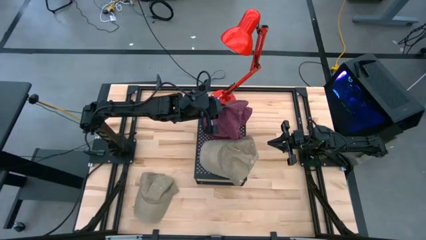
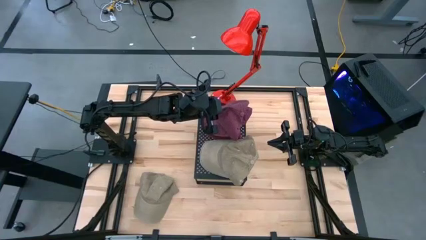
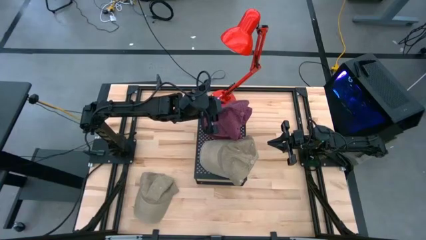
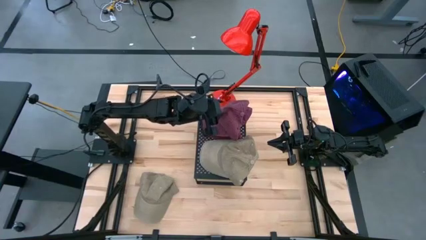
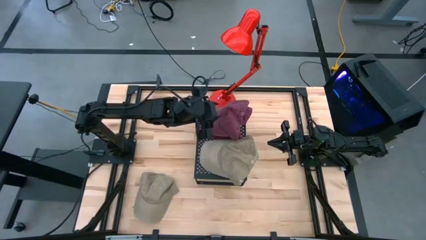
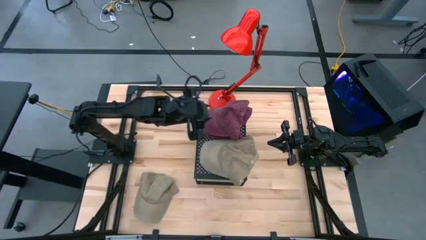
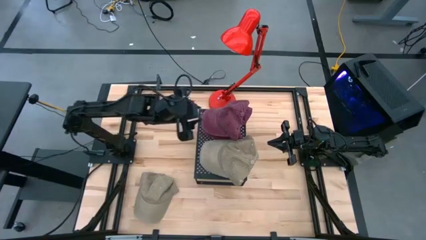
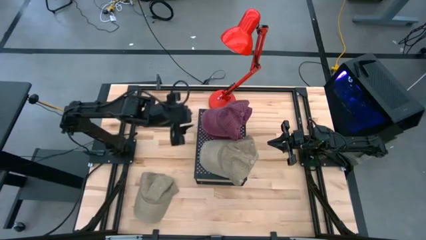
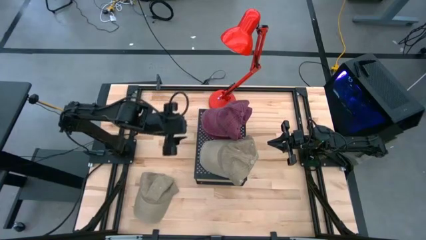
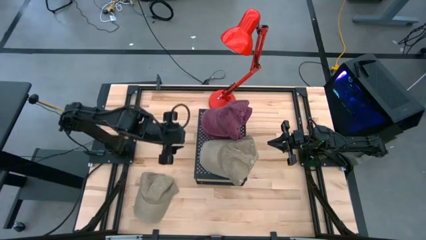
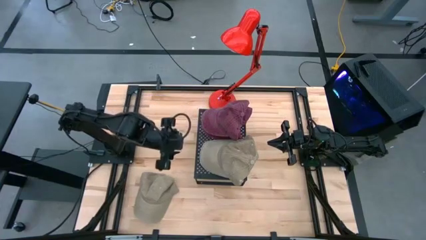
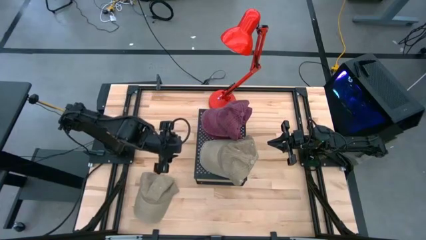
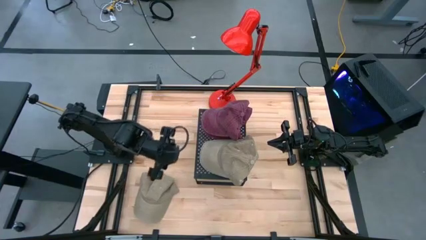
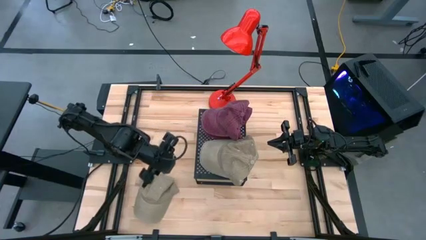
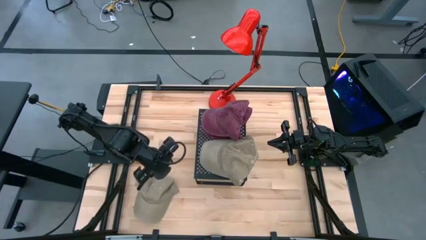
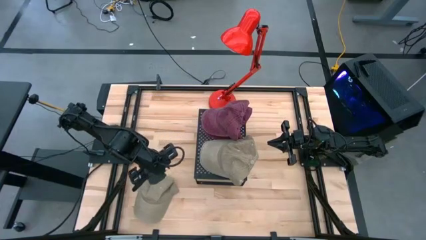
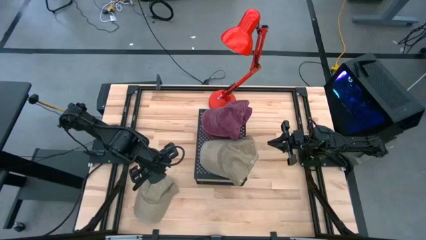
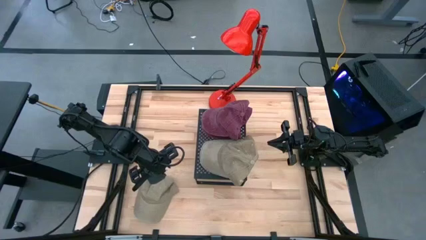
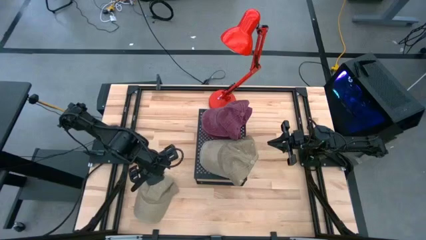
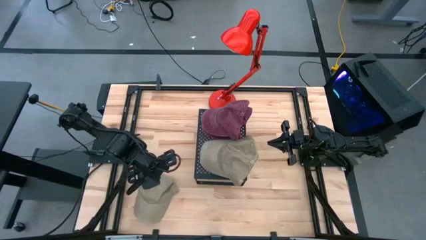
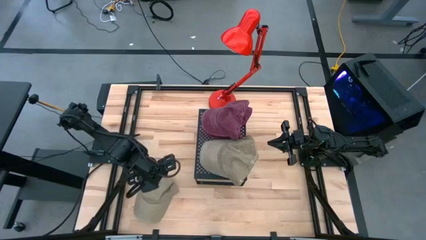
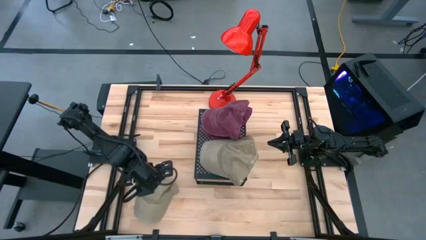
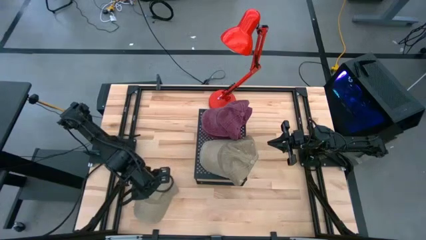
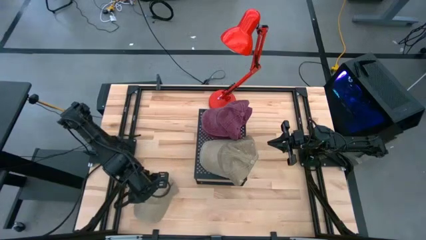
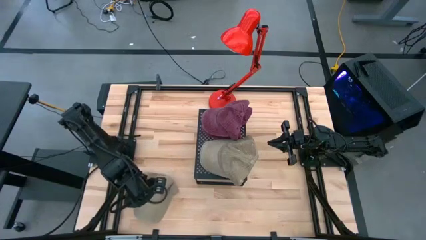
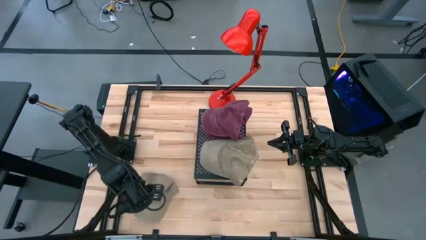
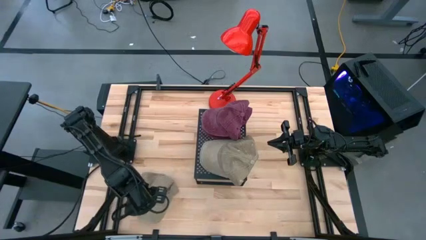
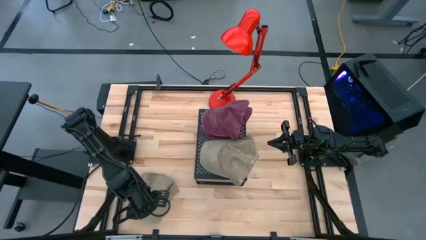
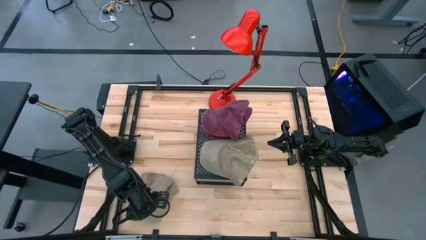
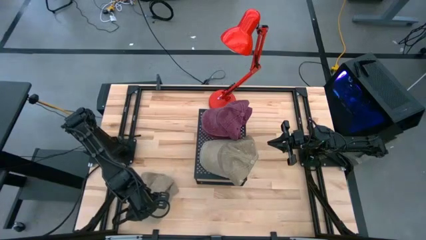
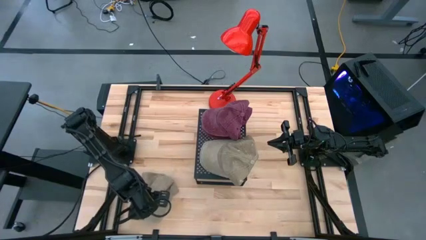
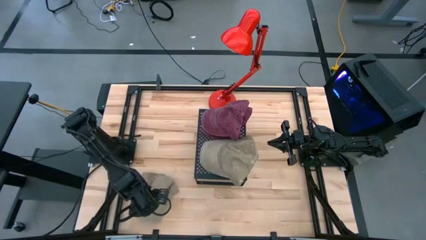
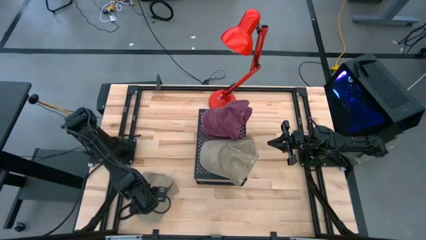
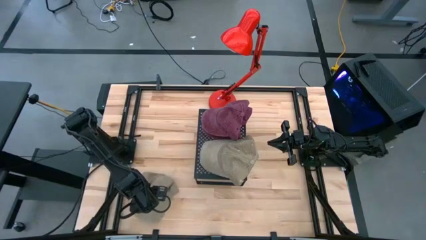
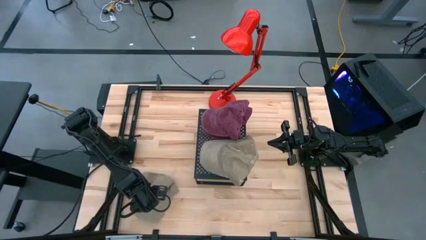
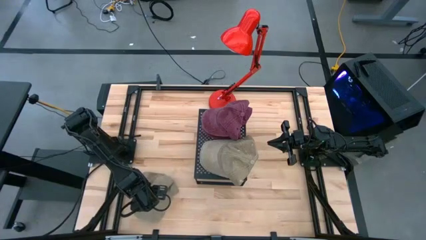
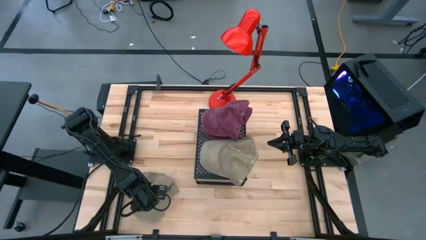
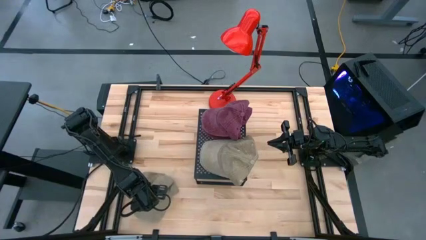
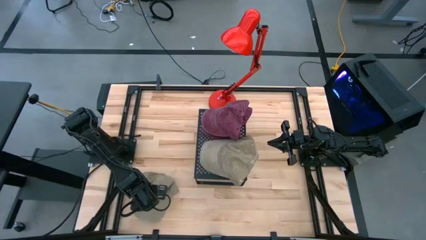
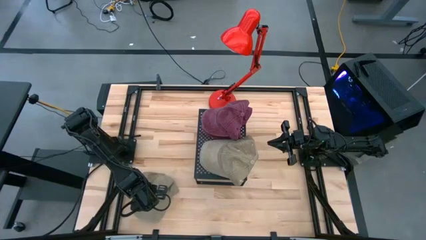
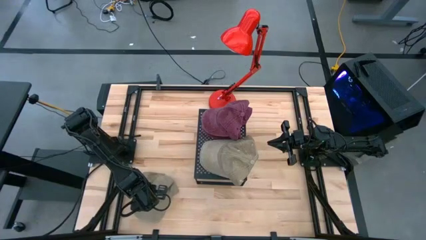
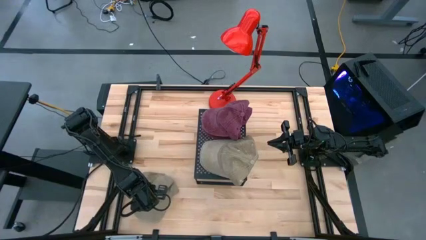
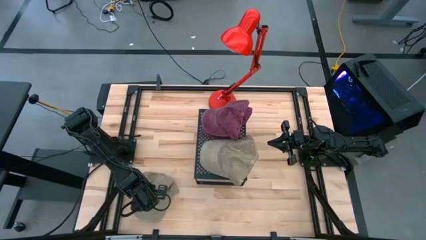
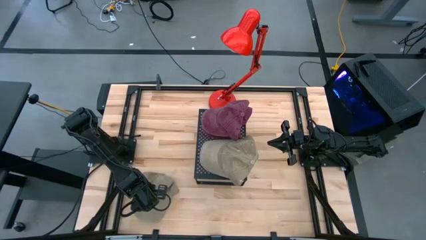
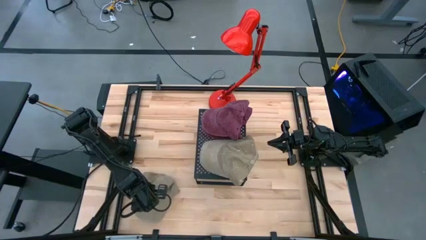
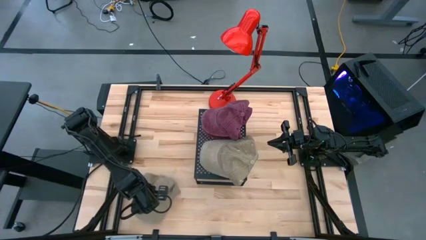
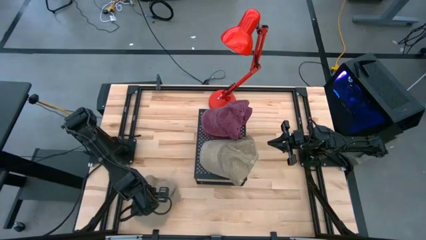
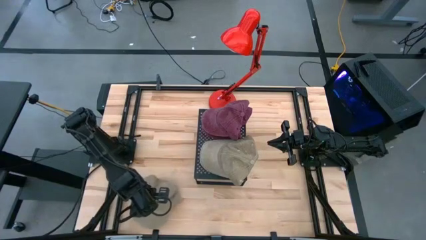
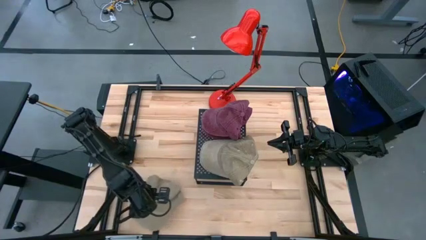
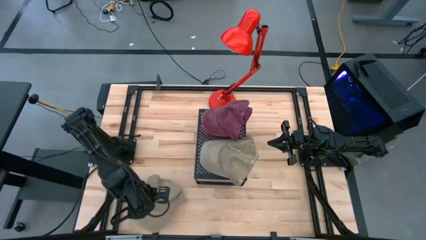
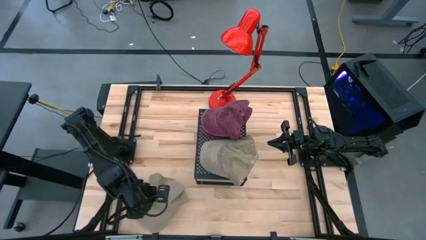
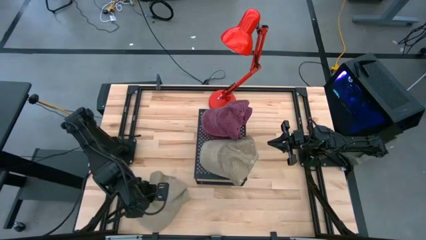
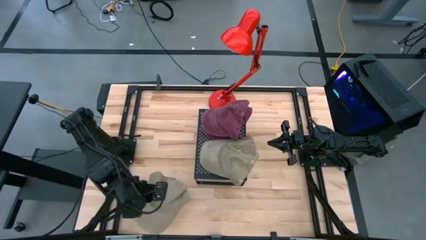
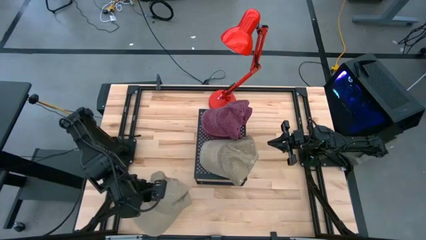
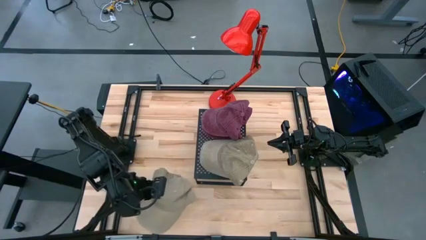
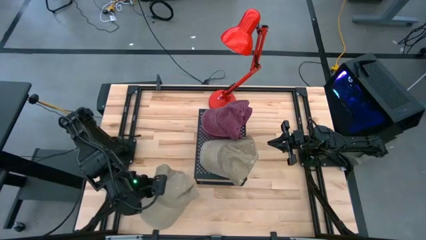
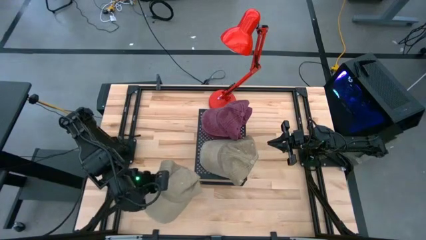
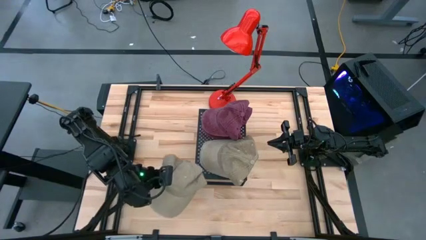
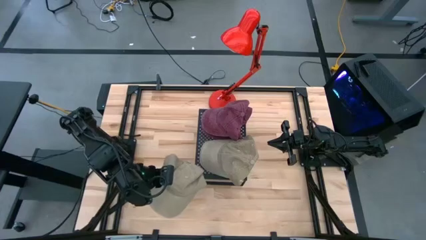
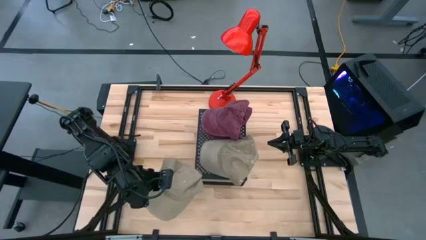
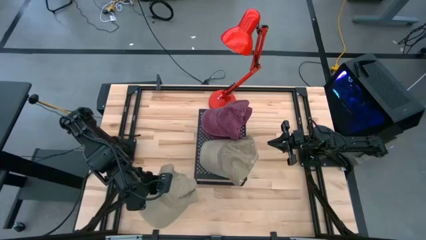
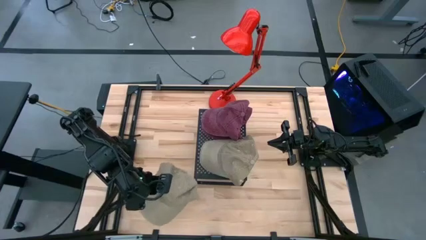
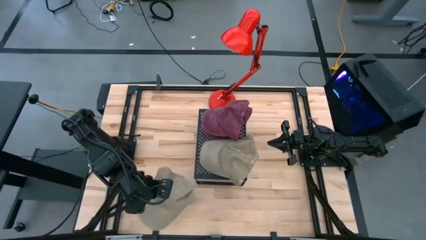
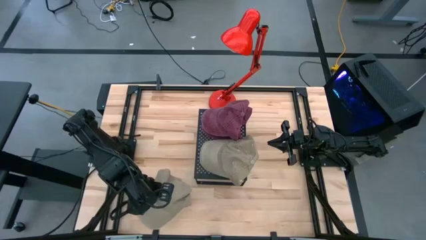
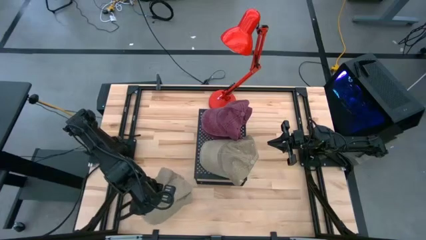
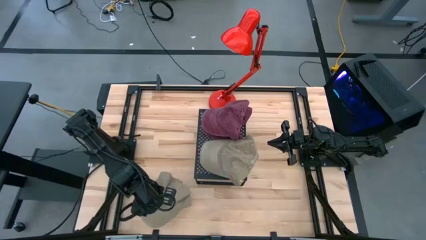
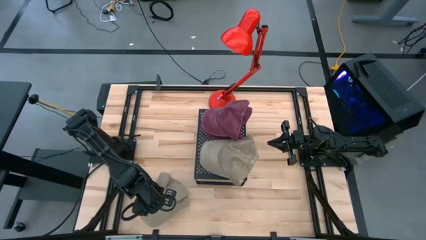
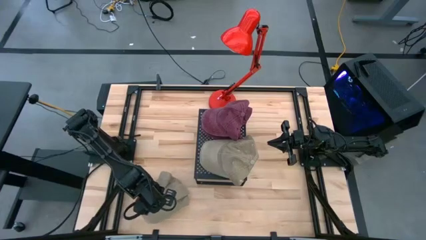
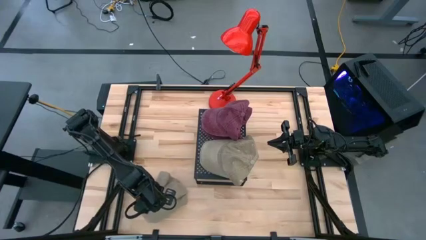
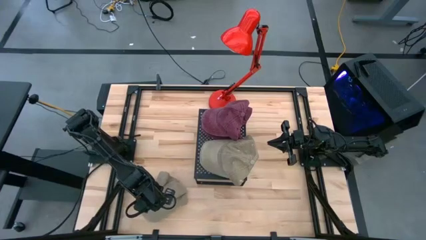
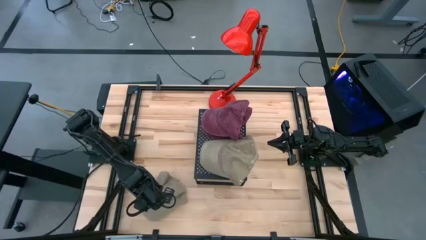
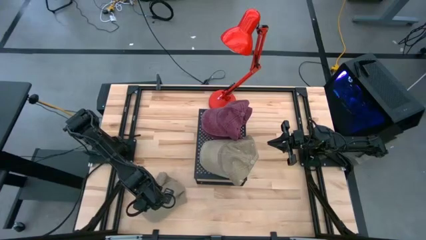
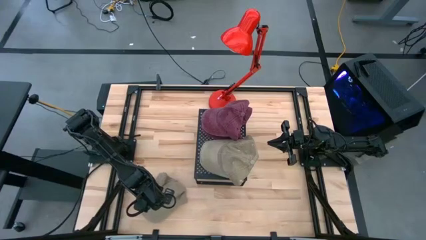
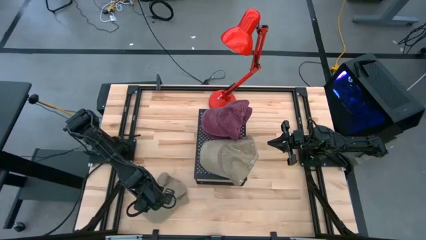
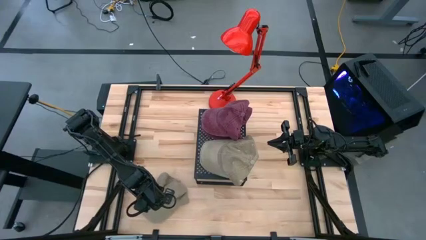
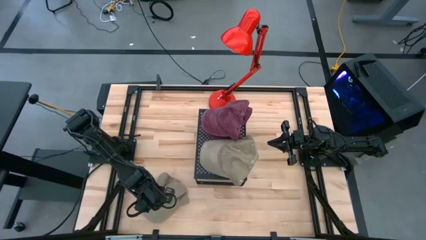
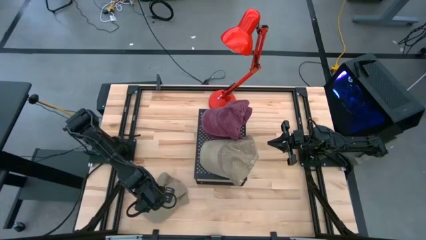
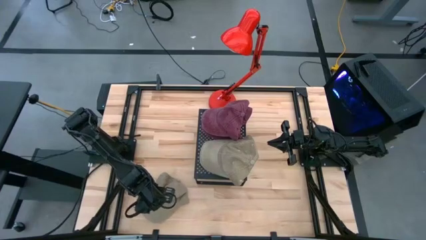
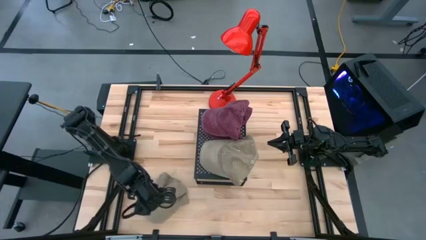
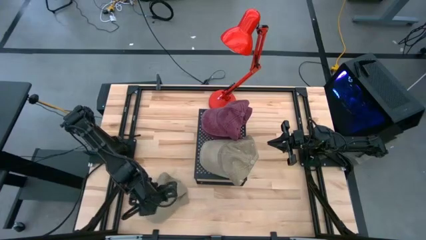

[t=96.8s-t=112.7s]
Task: Pick & Place hat
Stack the brown cap on top of the brown cap on the shelf
